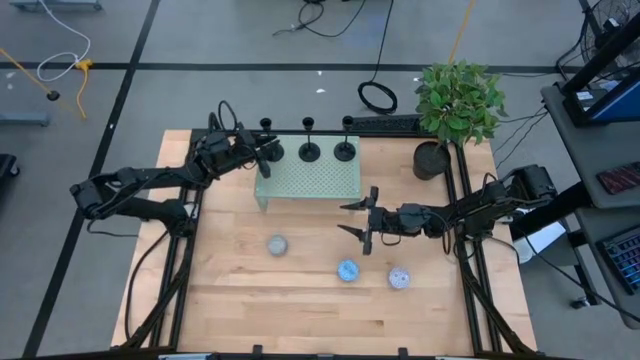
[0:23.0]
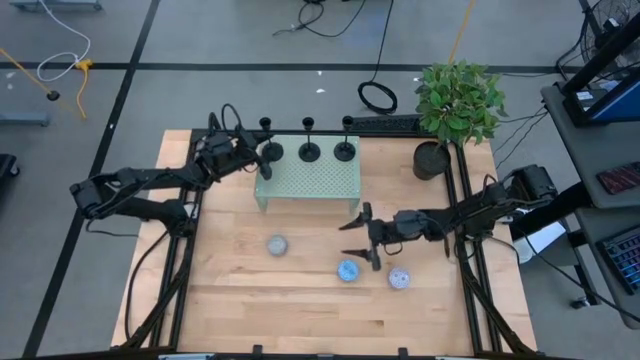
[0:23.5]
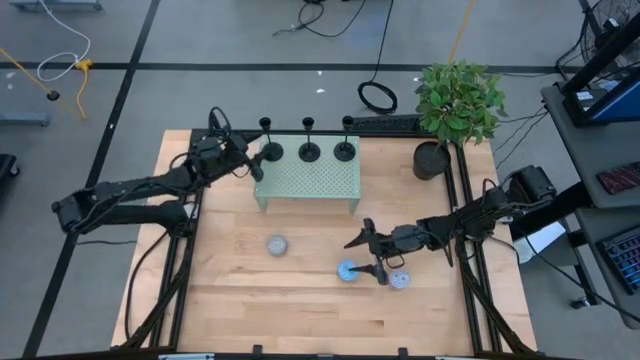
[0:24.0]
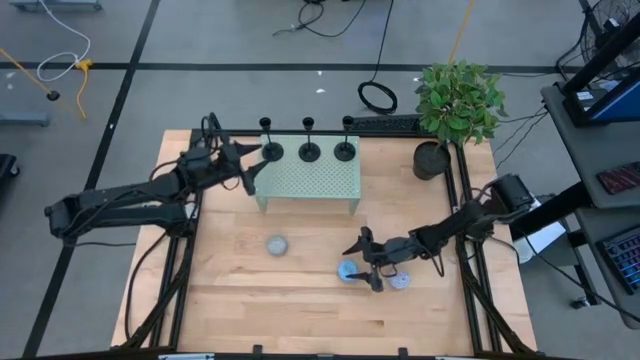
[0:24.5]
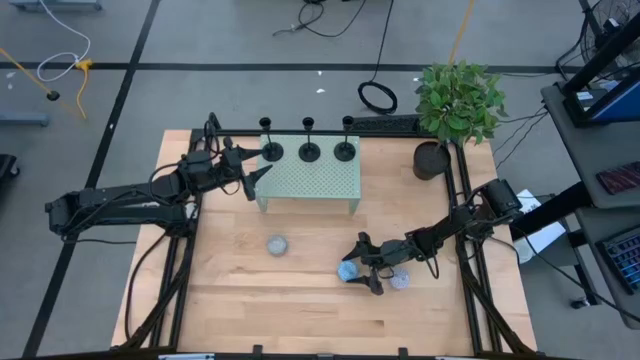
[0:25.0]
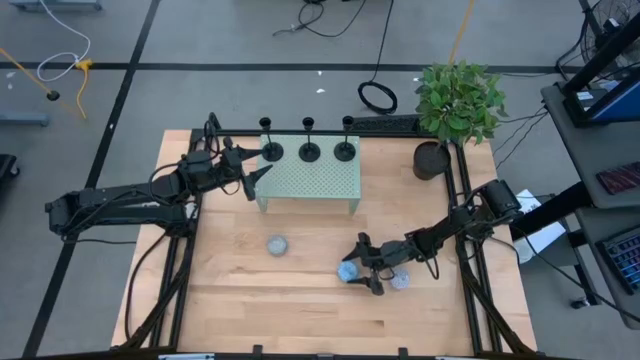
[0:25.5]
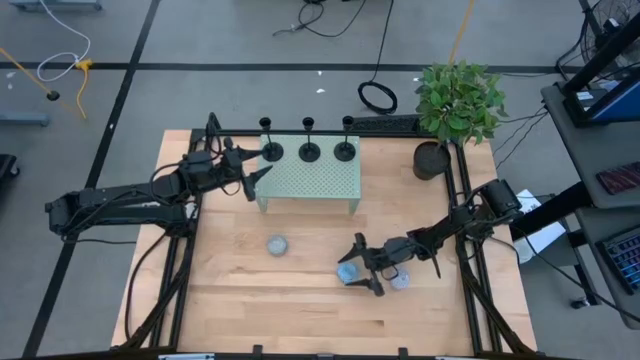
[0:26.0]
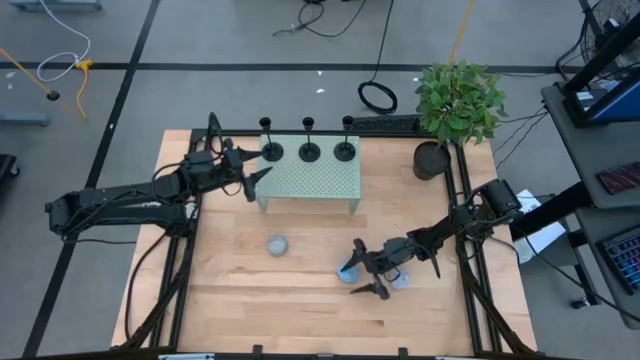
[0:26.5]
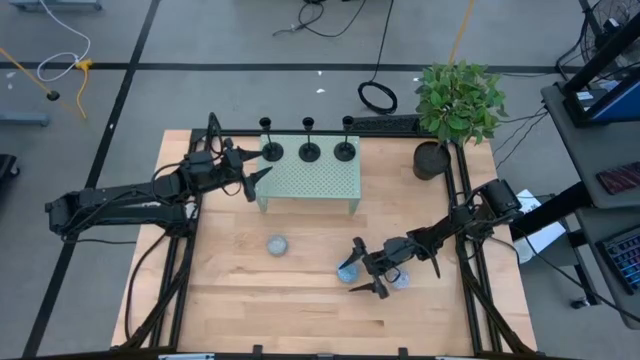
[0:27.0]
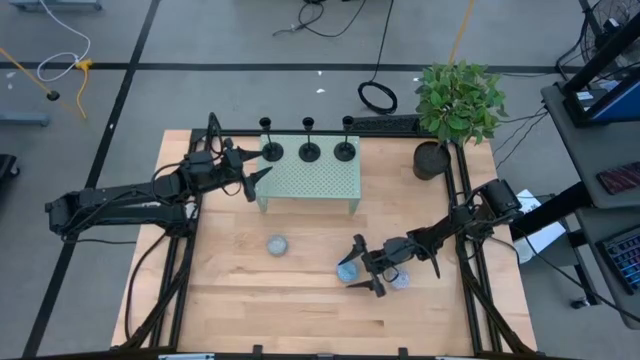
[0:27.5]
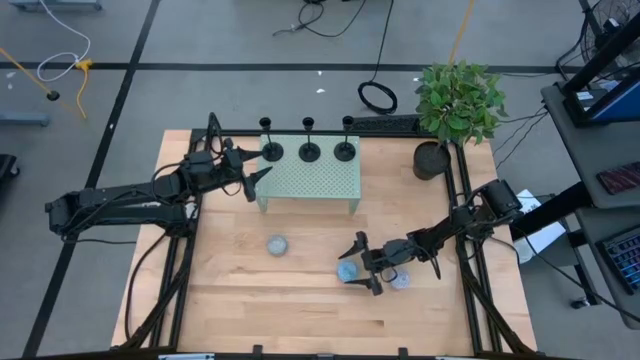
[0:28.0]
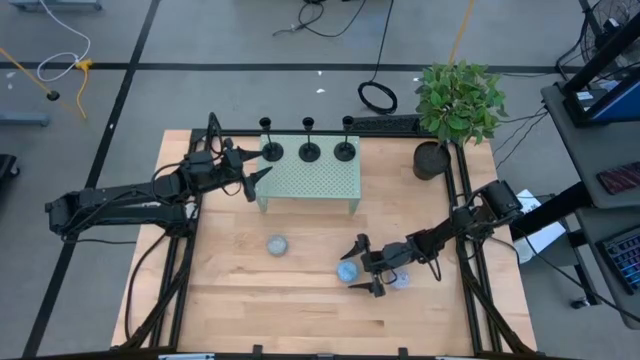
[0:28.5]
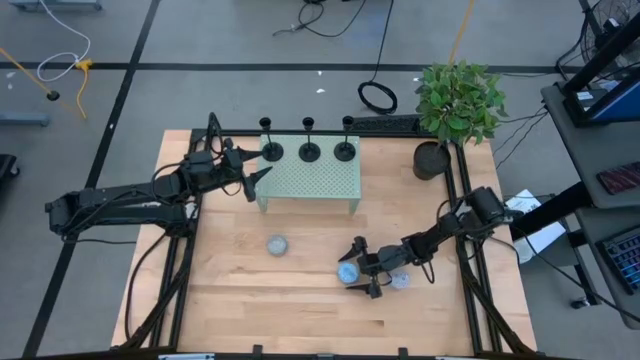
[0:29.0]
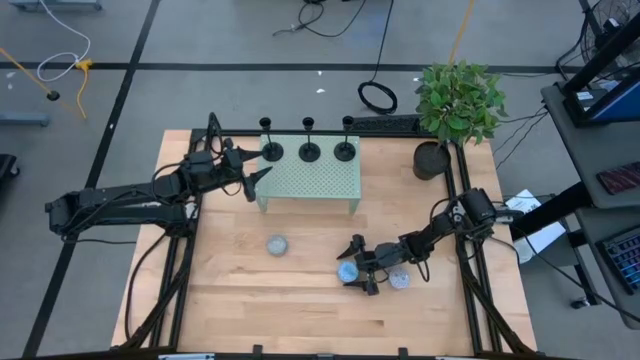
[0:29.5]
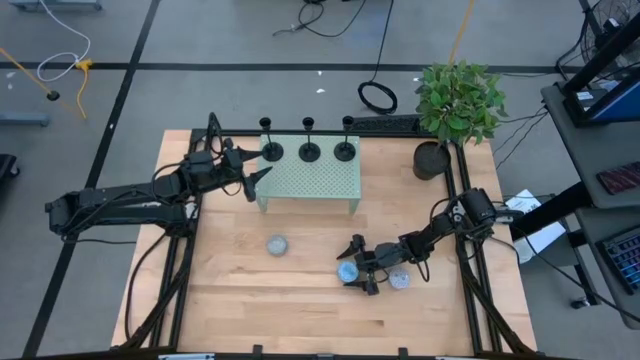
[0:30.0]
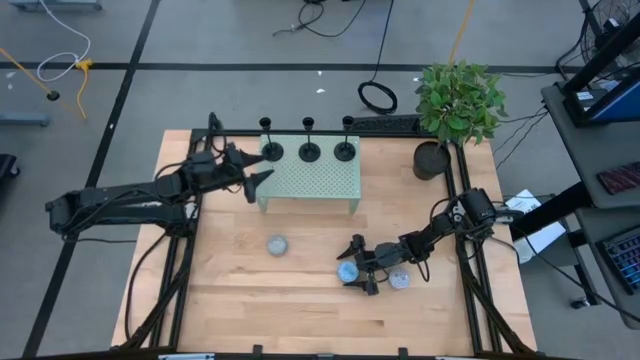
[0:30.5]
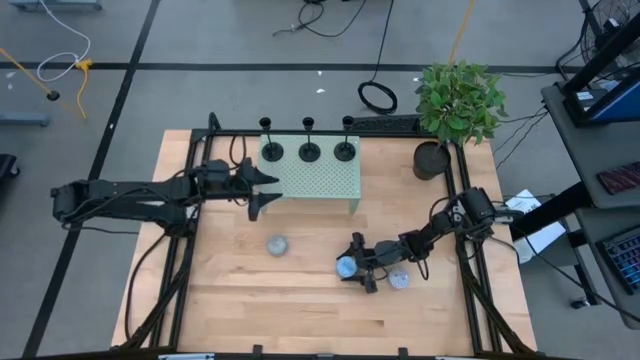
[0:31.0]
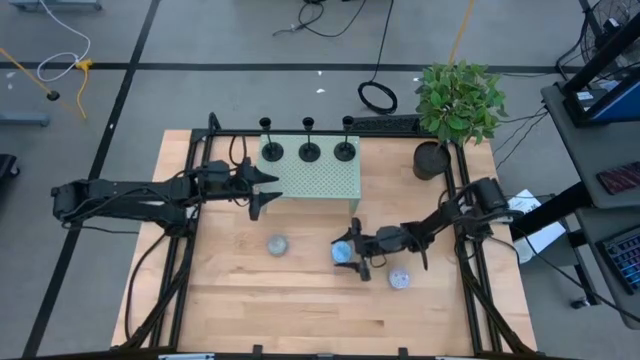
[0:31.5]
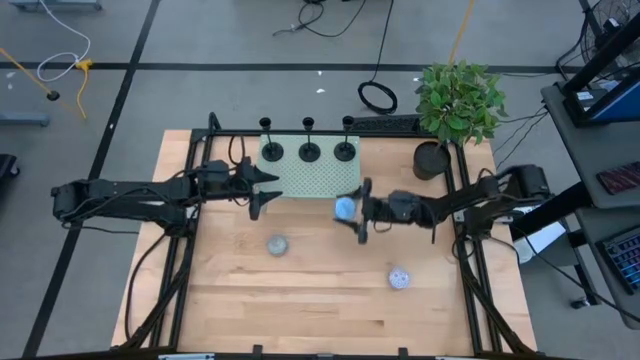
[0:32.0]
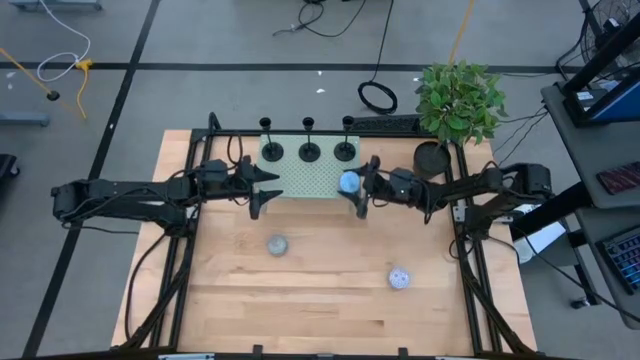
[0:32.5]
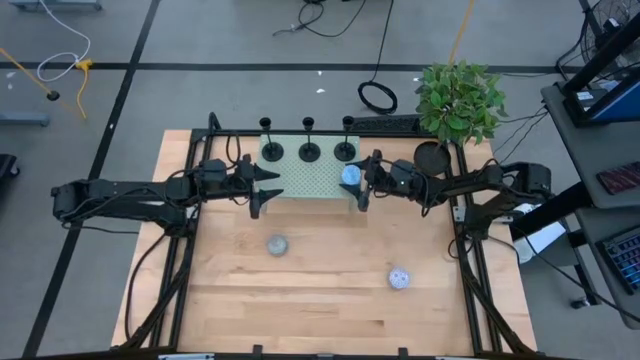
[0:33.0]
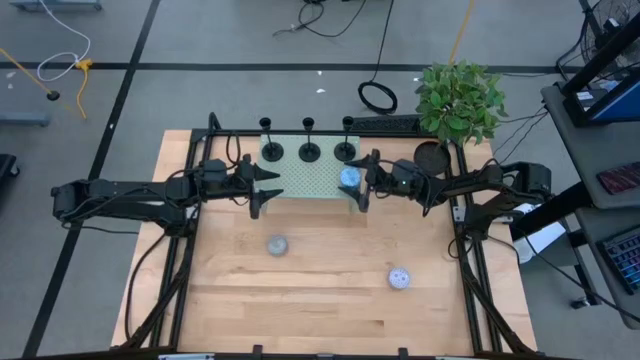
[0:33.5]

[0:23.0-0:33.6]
Task: Pick & Place candle stick holders
Put the blue white scented candle on the shelf

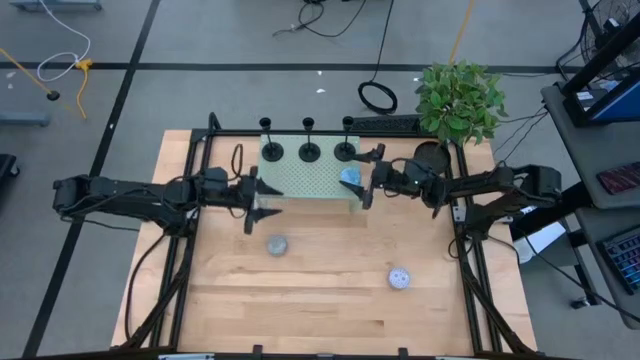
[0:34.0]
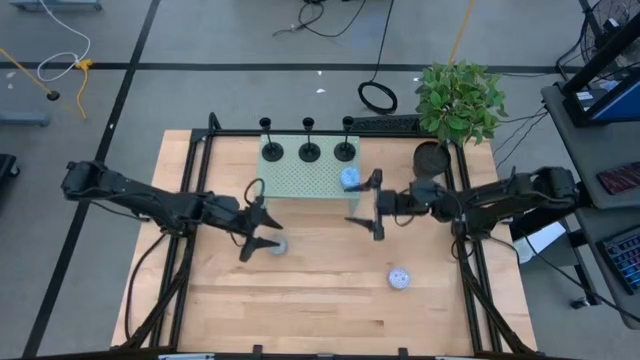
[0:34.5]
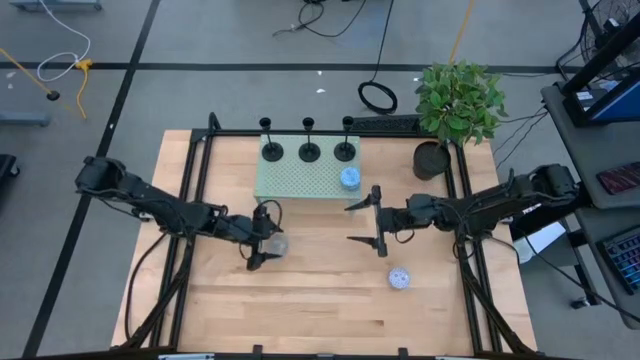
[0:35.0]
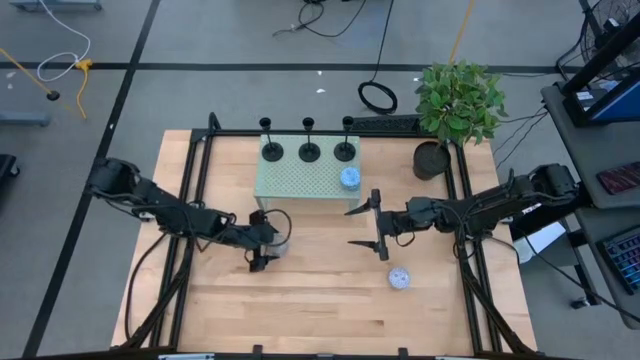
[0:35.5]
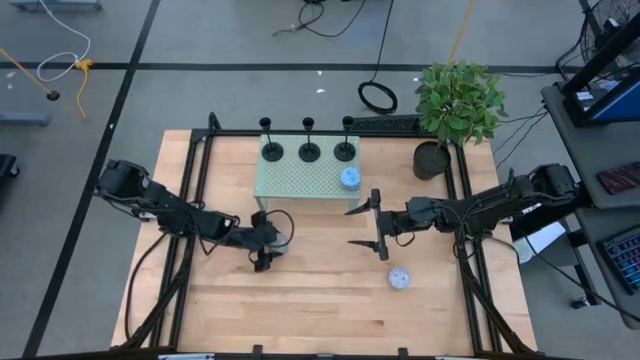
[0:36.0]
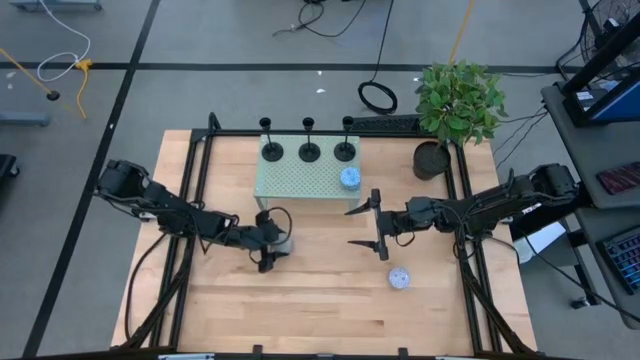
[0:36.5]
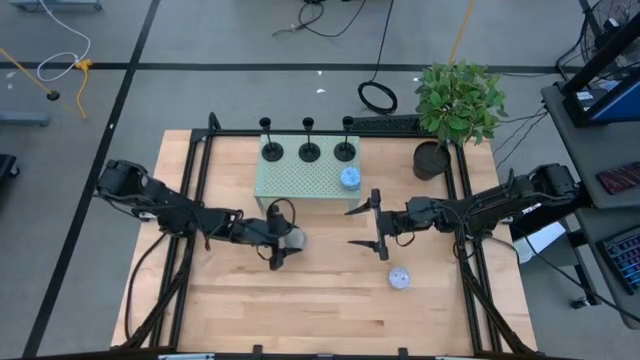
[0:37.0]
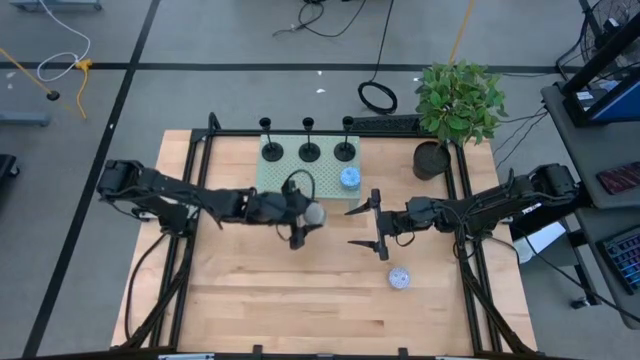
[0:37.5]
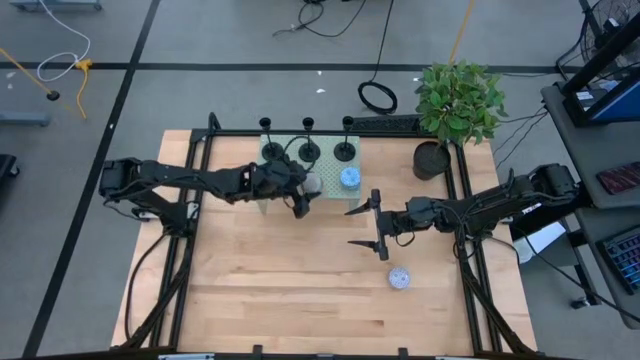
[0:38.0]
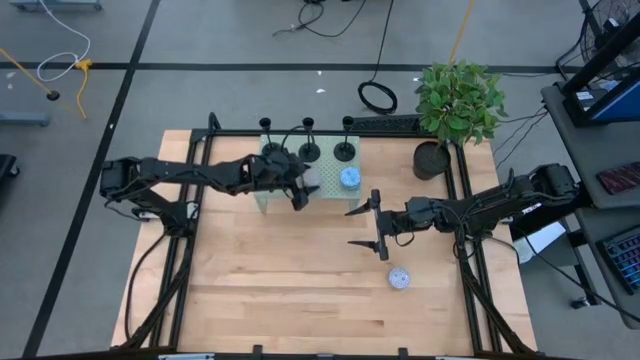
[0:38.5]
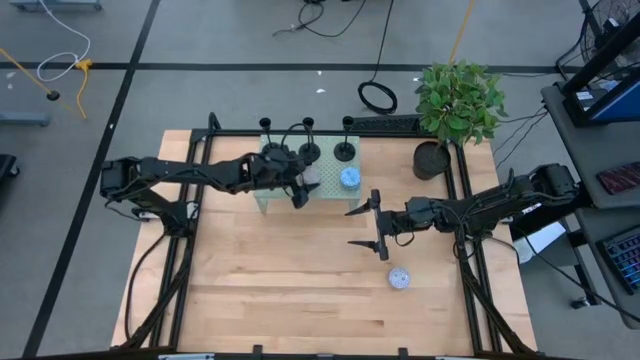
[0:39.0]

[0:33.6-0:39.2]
Put the blue orange scented candle on the shelf aligned with the blue white scented candle

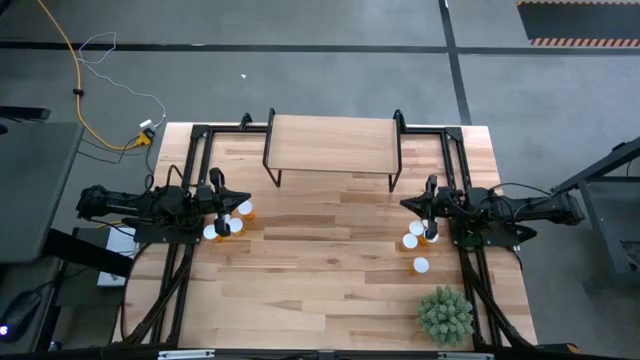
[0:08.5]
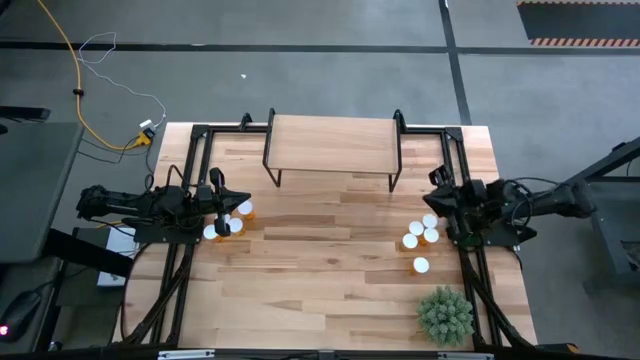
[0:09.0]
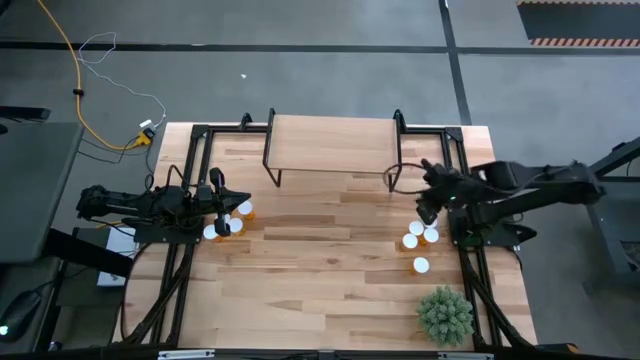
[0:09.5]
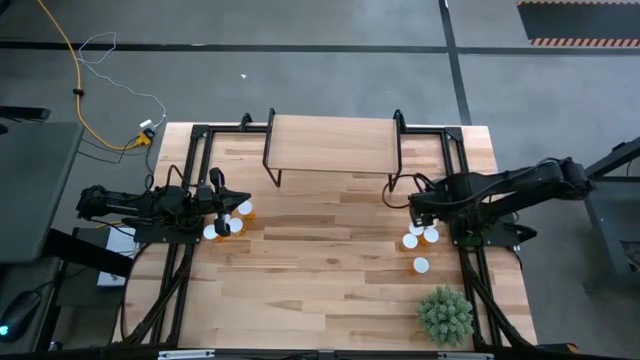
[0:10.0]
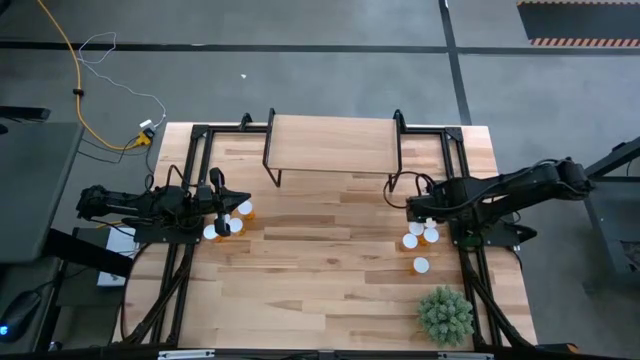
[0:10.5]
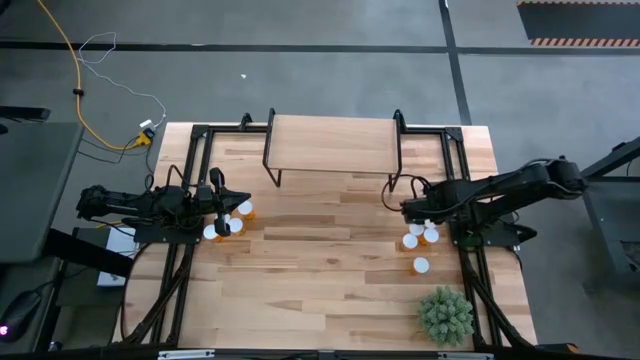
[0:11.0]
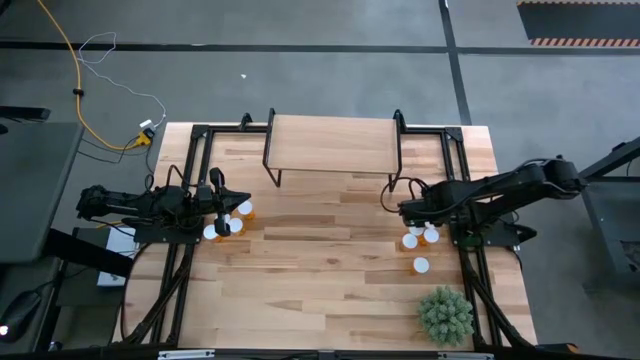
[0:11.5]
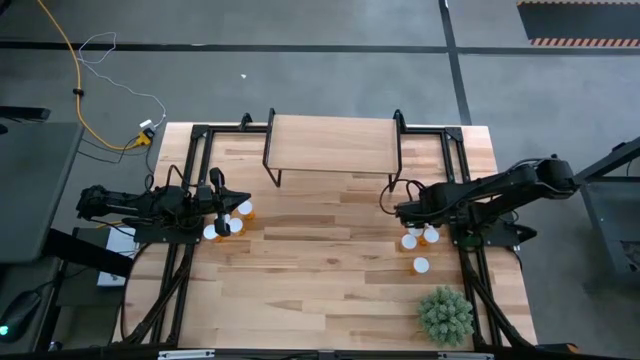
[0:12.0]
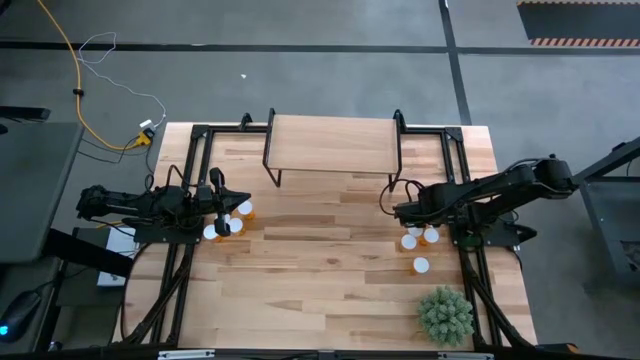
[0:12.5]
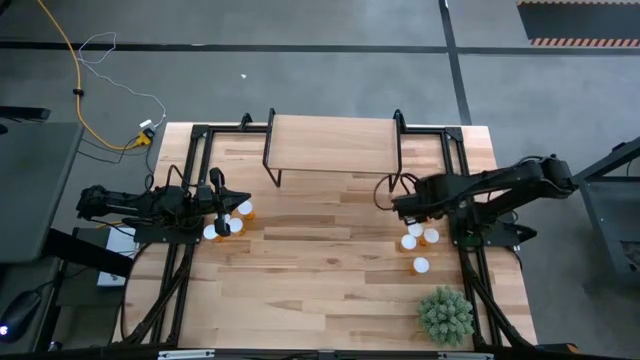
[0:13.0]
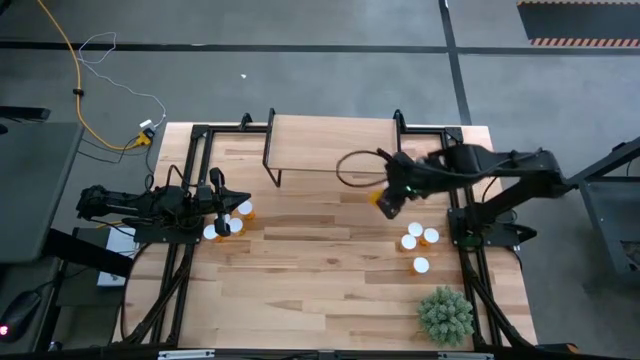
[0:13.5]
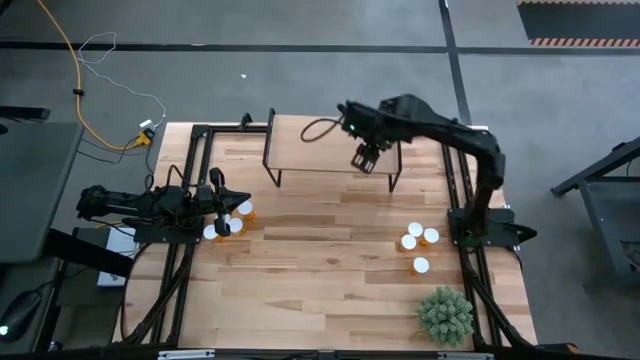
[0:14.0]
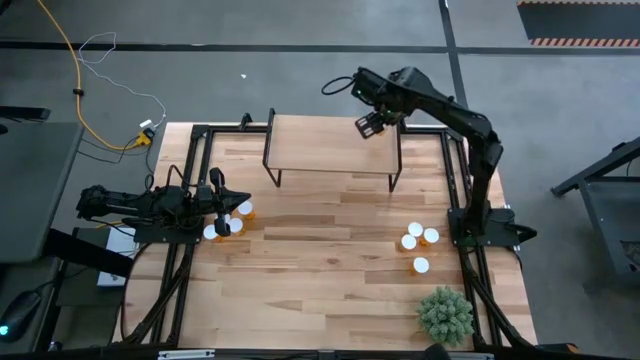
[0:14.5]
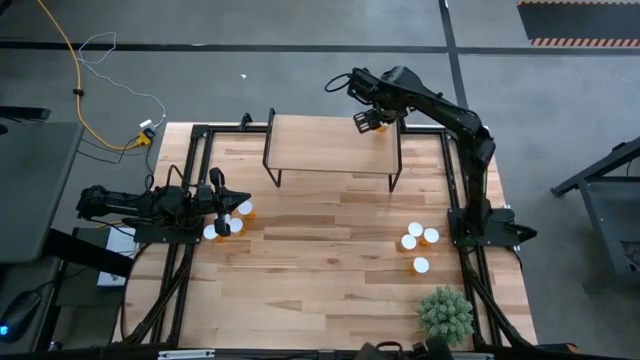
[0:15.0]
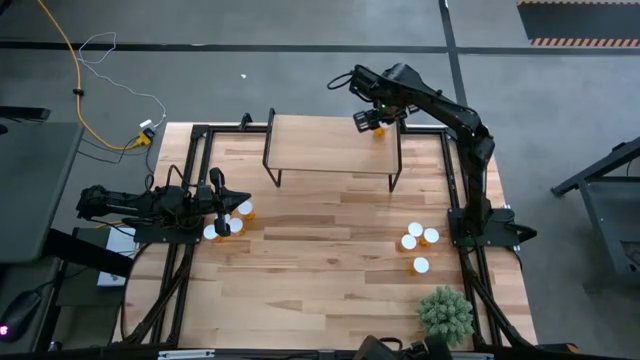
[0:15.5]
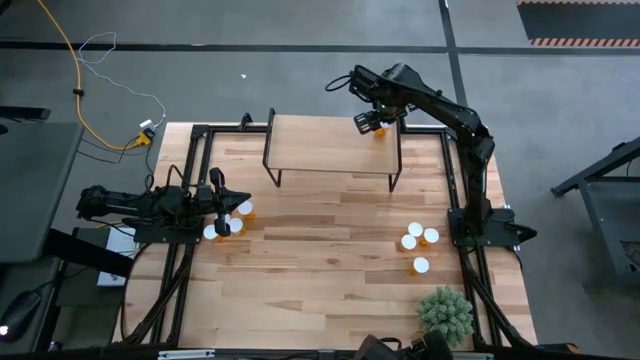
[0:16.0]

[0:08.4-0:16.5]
Task: Pick and place medicine bottles onto shelf by color
Put the yellow pill bottle on the shelf
